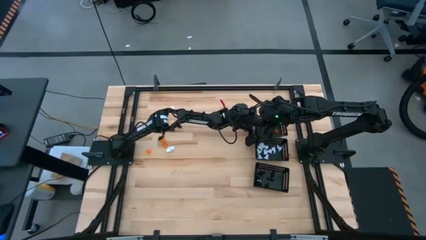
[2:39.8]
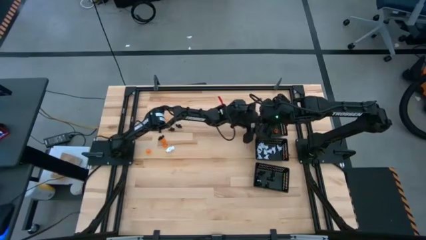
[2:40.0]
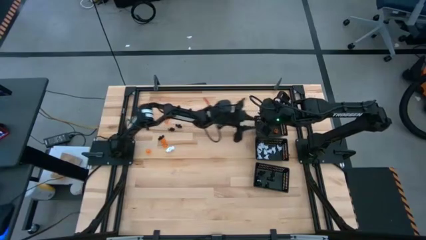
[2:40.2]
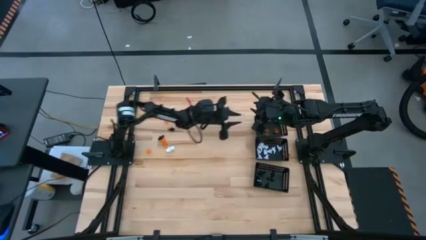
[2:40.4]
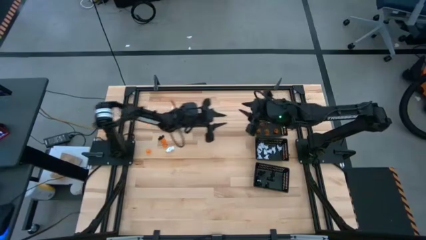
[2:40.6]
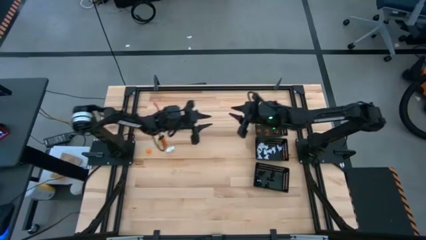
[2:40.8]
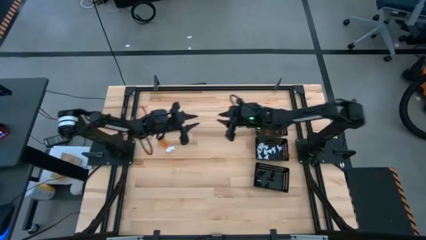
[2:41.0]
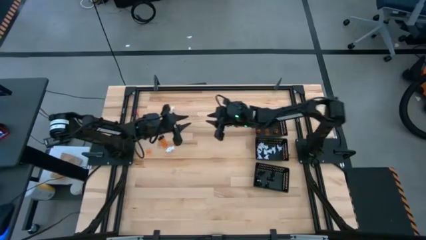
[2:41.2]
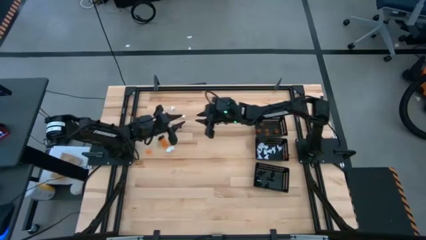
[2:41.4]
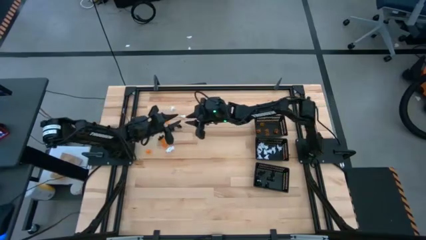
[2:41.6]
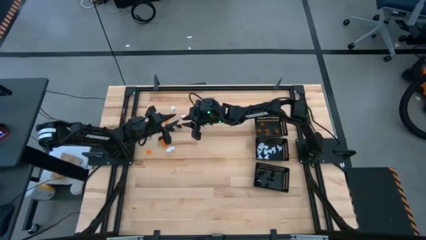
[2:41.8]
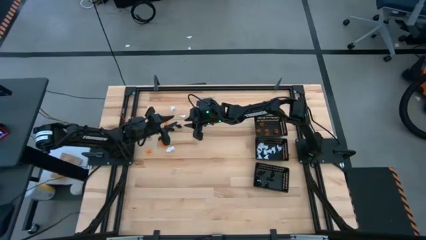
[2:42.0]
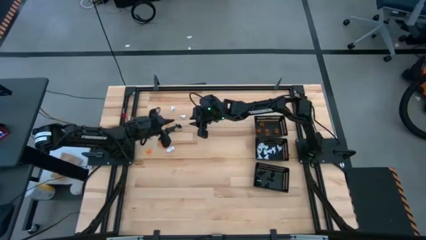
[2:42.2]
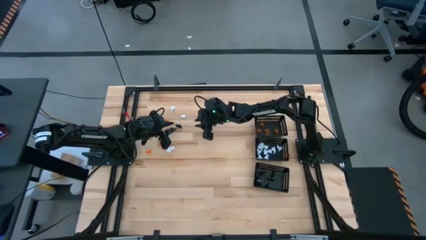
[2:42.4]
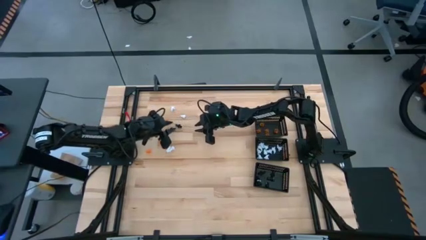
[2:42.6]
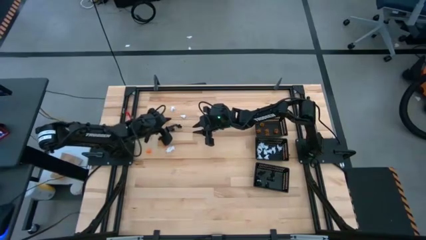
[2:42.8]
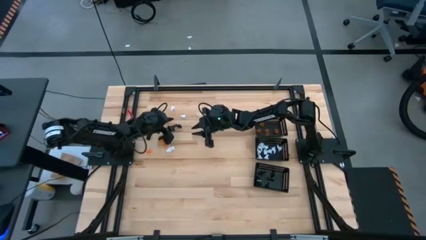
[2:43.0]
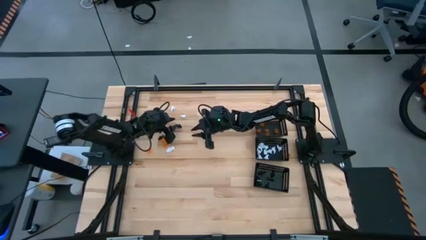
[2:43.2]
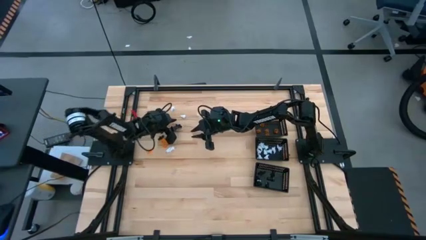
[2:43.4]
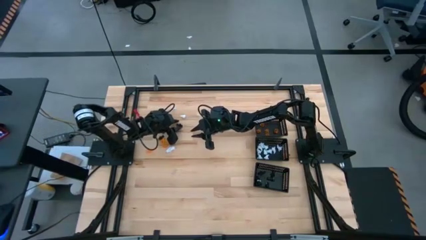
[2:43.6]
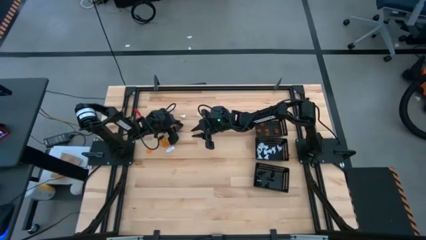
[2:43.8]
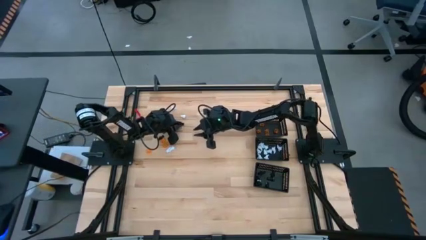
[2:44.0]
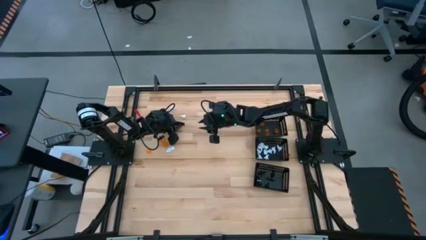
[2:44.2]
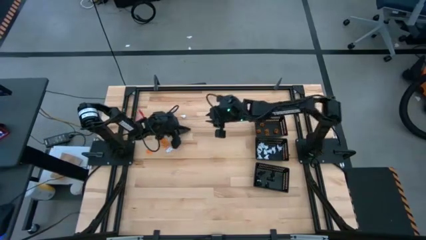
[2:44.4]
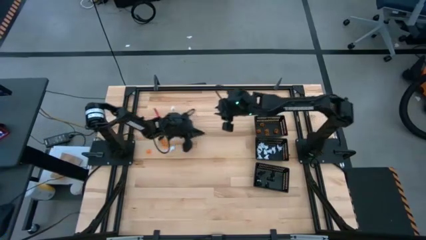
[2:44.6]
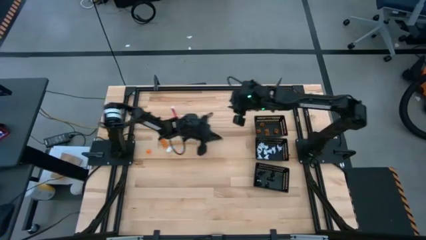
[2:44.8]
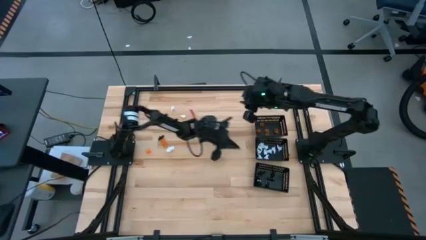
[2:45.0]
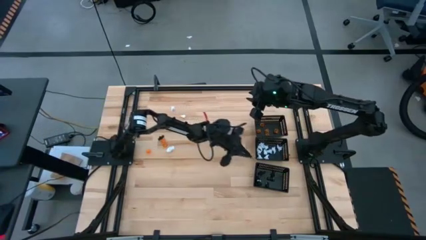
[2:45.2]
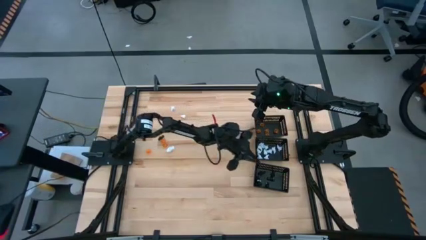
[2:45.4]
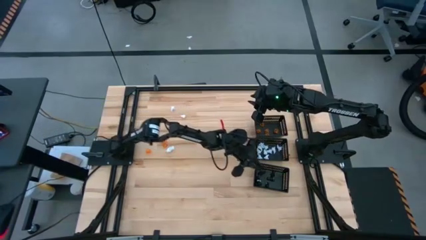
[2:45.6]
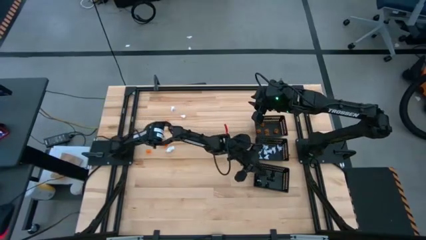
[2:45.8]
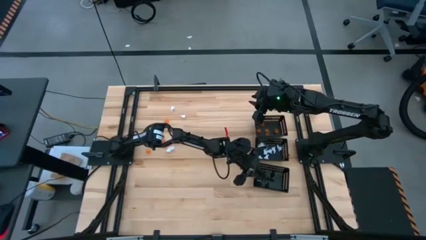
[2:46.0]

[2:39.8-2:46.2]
Task: Sort Halloween decoration
Put the black skeleton toy into the bottom black bin

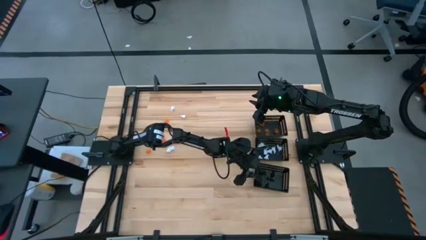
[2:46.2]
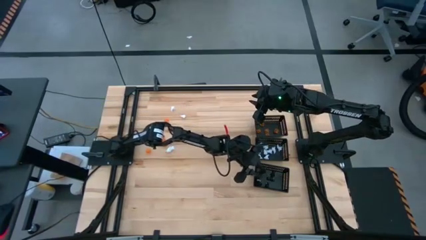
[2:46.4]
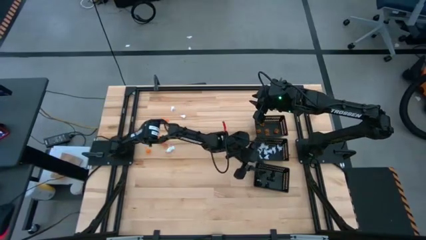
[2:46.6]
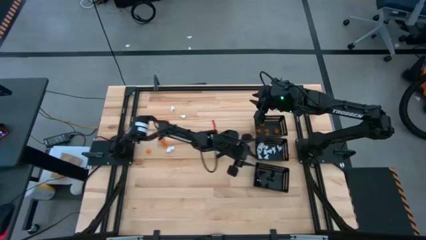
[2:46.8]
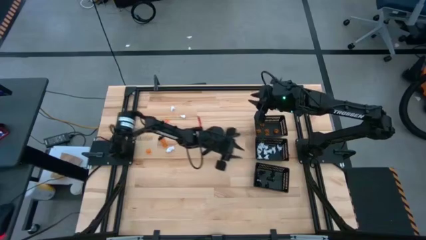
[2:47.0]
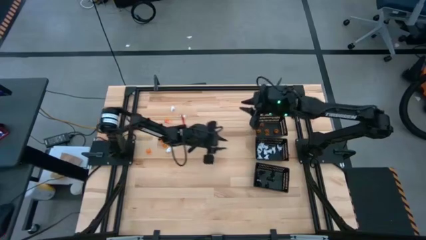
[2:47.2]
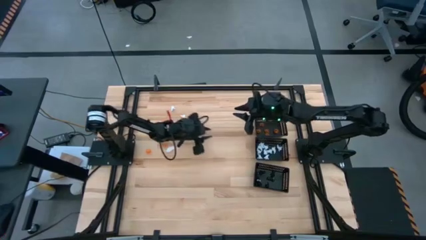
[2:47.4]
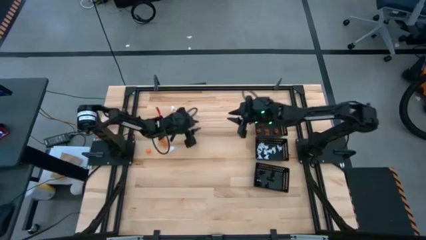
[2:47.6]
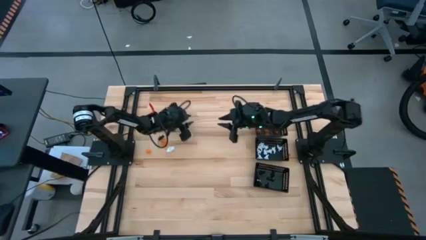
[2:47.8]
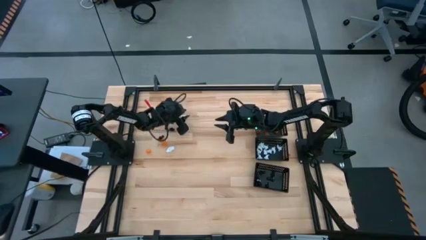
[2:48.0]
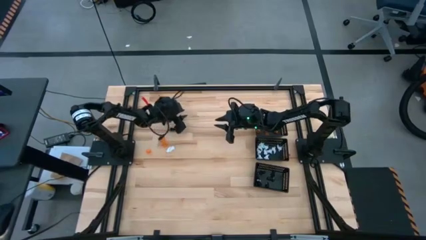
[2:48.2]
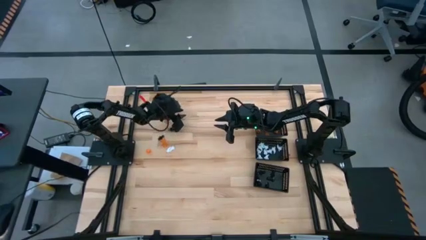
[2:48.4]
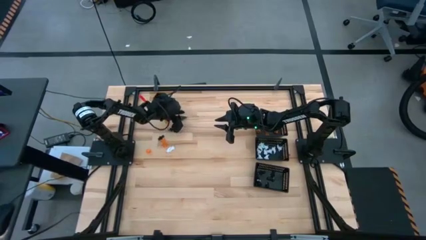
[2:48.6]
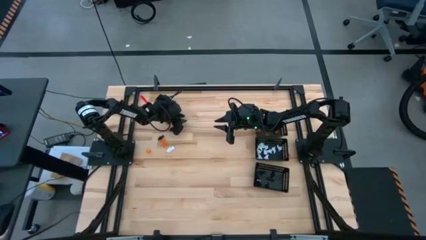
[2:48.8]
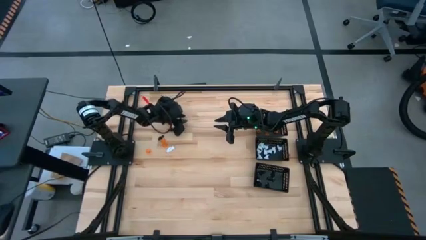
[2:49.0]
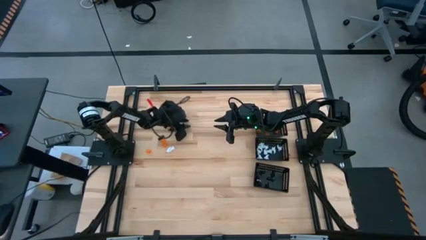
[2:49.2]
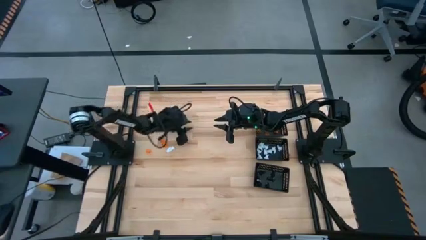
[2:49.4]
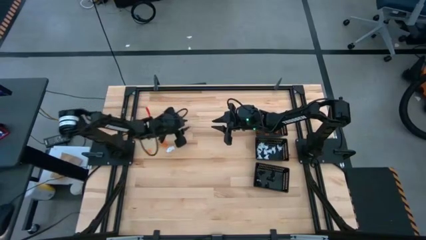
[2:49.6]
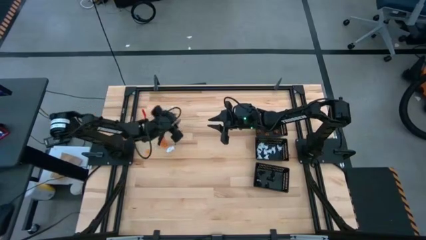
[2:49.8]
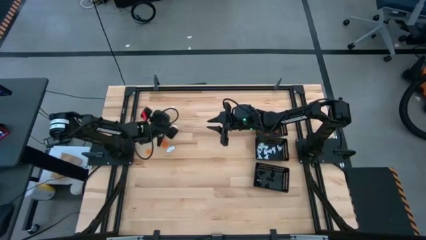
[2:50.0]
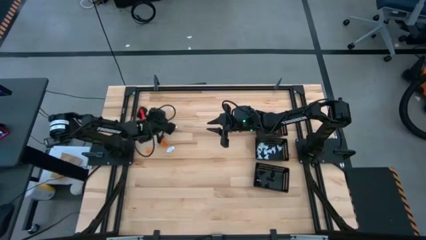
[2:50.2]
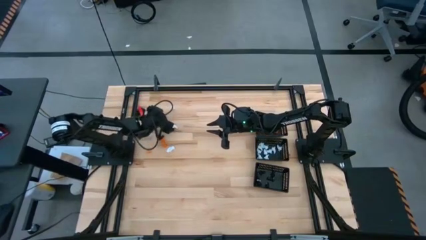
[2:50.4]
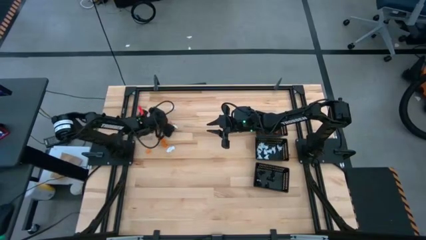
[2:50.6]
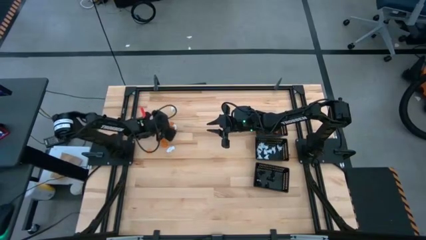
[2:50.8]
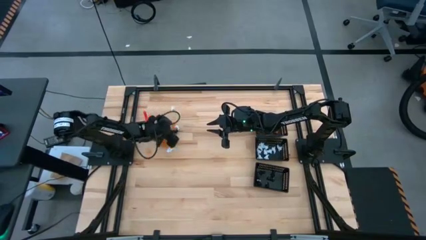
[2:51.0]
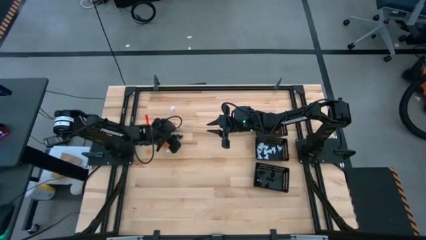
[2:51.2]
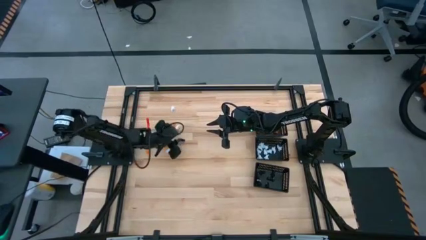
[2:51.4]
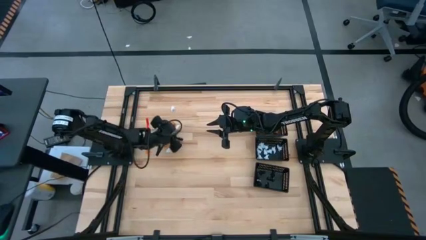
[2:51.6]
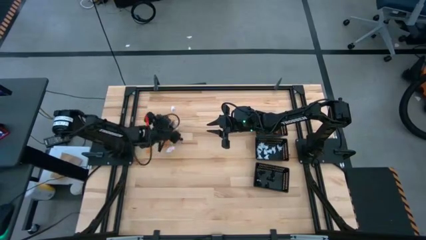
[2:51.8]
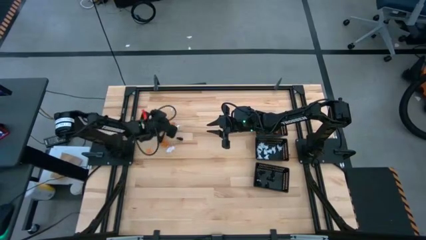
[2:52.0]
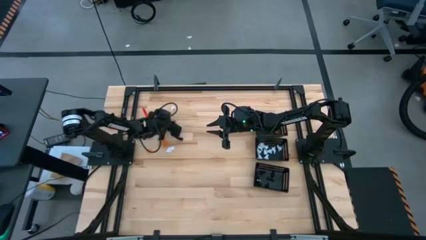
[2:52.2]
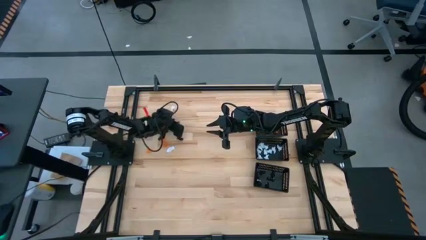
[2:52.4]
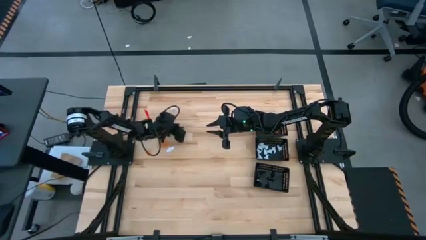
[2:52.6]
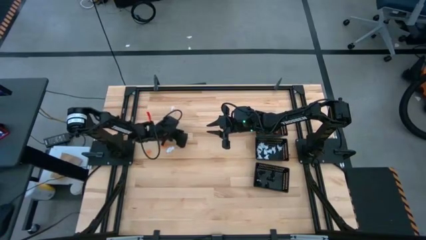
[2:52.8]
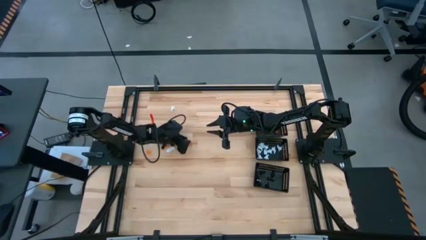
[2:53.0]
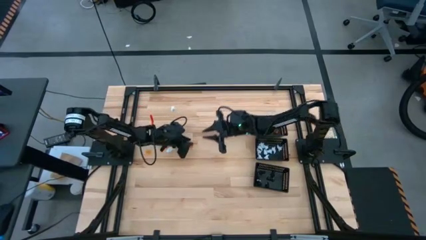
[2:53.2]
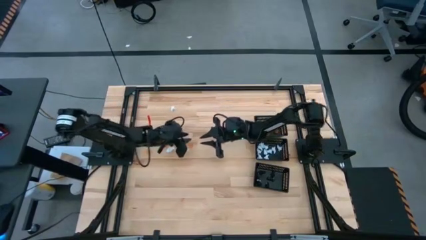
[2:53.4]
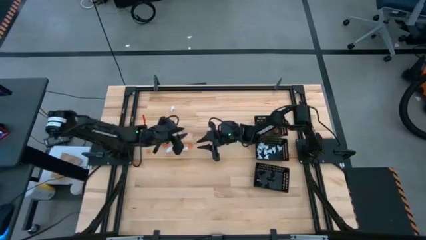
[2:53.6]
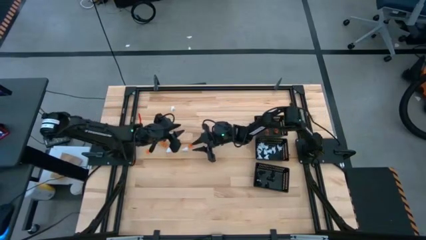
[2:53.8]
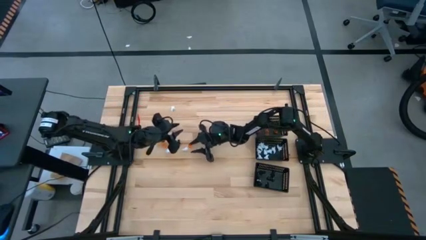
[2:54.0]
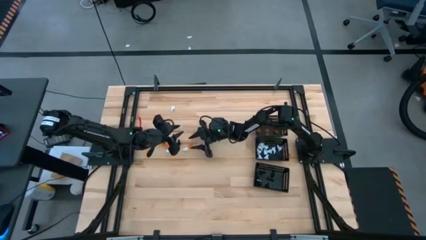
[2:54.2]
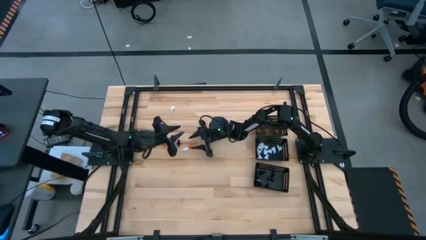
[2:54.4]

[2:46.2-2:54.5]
Move the toys at the center

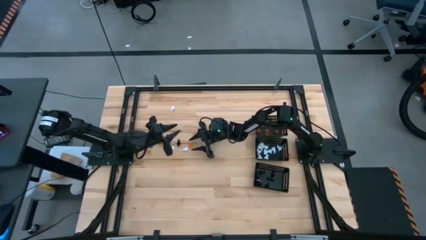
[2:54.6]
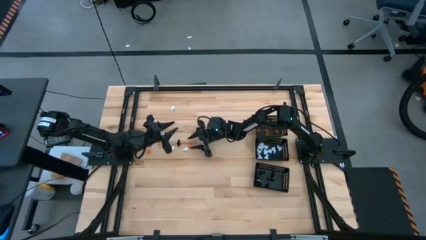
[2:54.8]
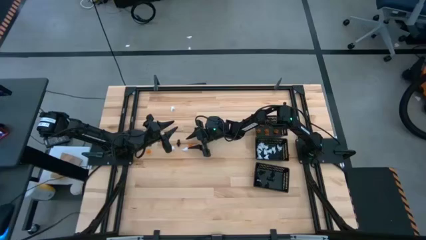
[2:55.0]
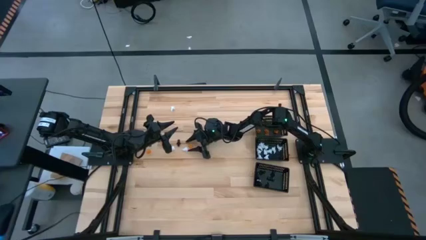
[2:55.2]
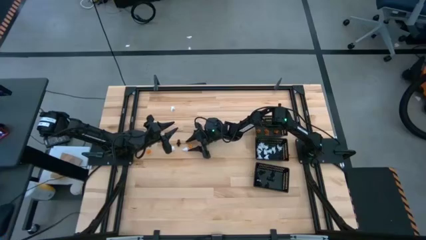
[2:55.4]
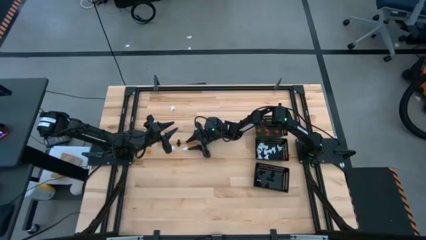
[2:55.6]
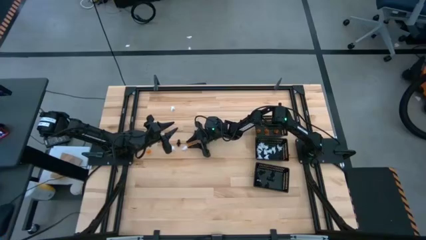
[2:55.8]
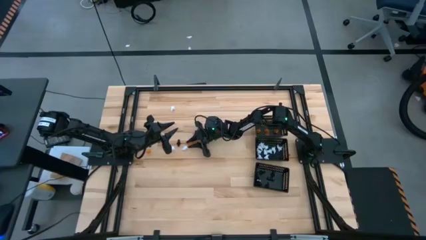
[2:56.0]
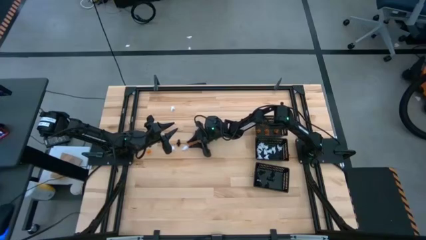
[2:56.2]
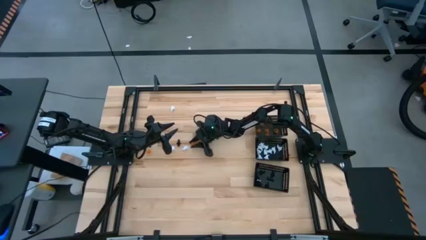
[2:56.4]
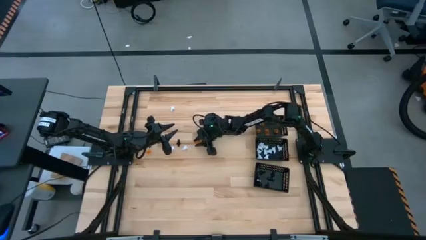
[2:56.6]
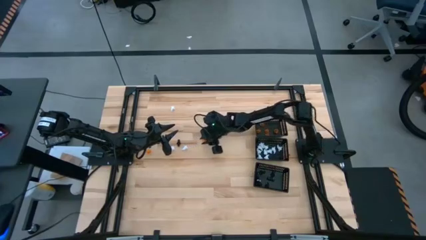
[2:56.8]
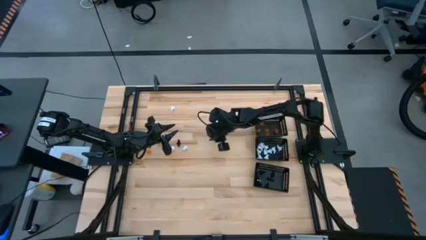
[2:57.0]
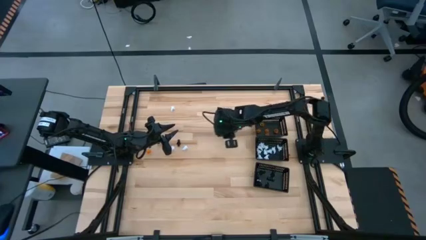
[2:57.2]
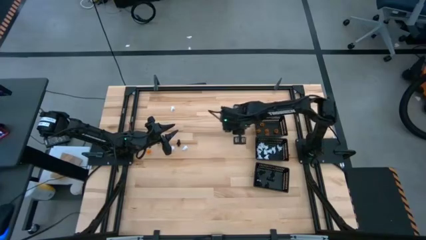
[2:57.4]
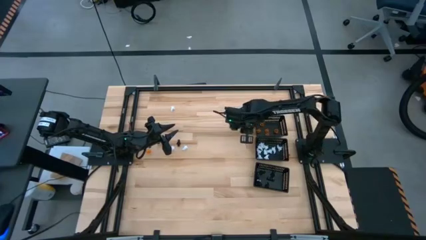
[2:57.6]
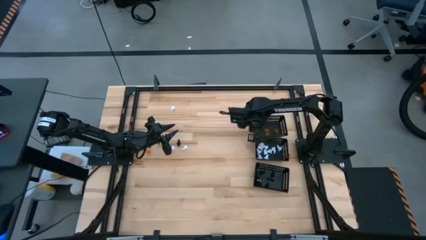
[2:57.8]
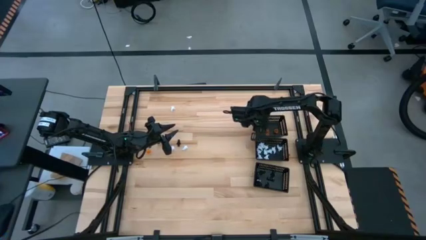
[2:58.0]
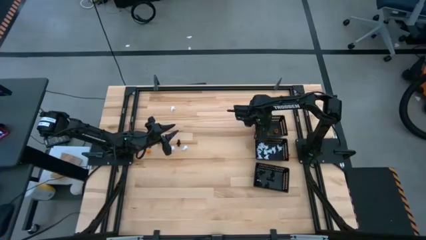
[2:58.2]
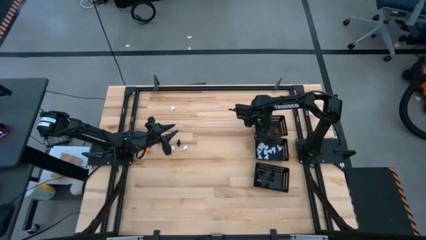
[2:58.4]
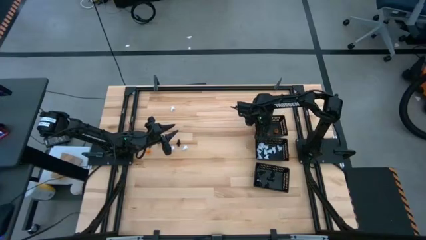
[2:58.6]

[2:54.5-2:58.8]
Put the orange pumpkin toy into the top black bin
